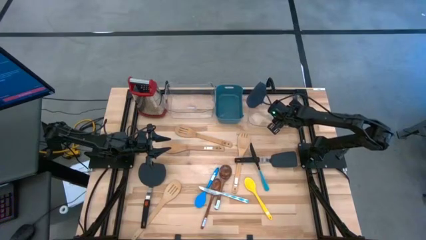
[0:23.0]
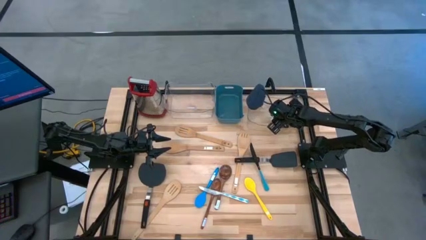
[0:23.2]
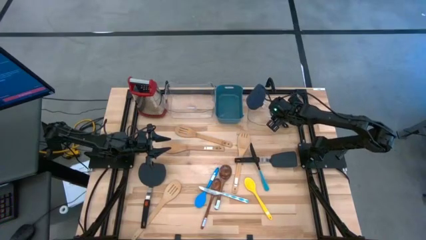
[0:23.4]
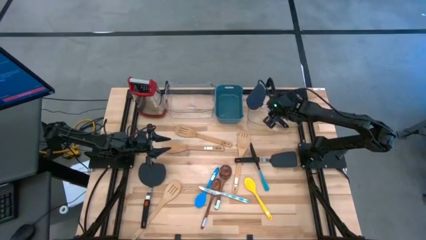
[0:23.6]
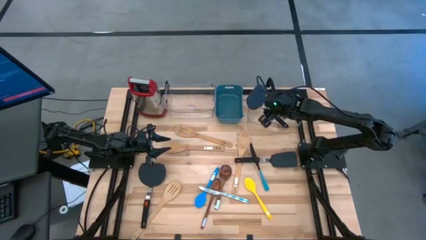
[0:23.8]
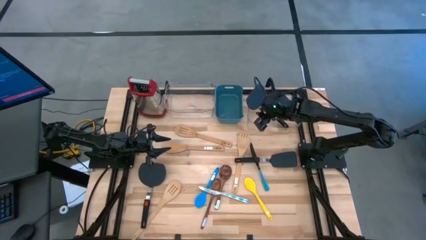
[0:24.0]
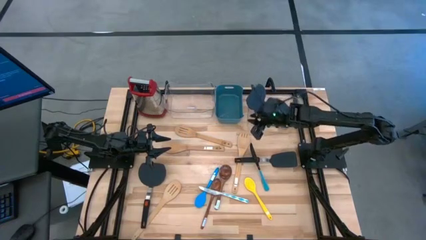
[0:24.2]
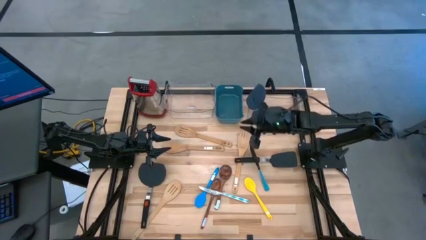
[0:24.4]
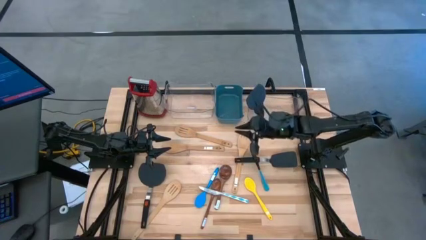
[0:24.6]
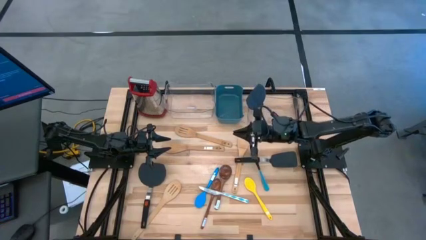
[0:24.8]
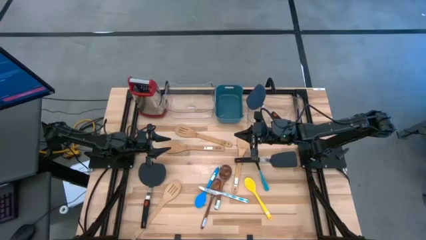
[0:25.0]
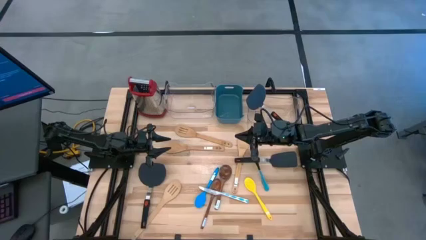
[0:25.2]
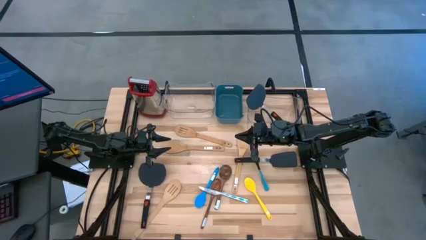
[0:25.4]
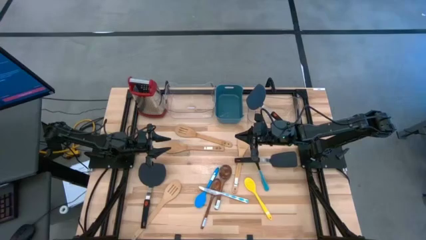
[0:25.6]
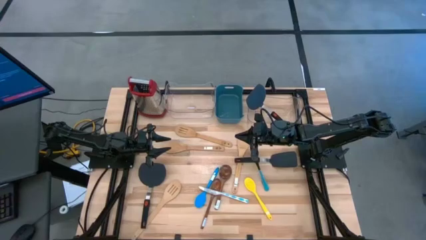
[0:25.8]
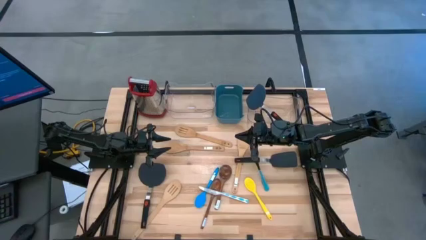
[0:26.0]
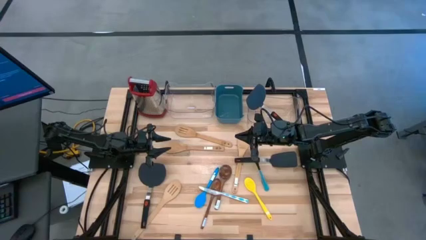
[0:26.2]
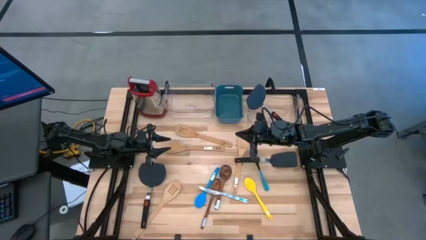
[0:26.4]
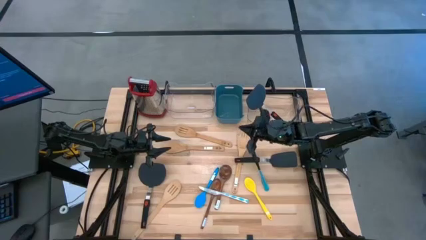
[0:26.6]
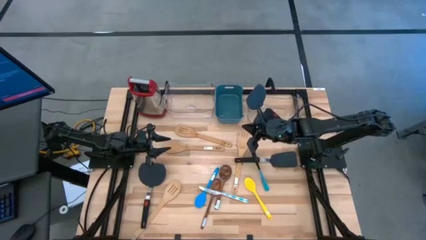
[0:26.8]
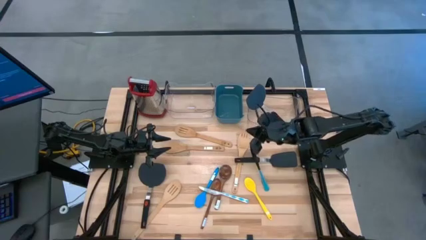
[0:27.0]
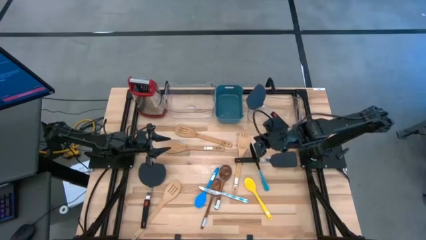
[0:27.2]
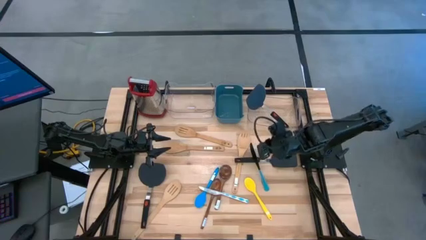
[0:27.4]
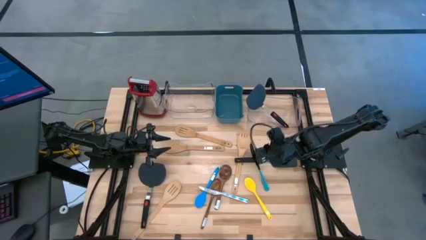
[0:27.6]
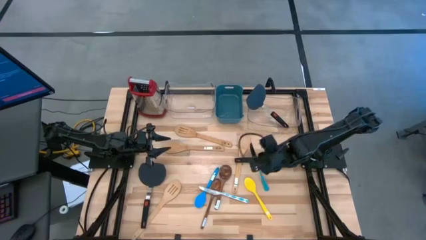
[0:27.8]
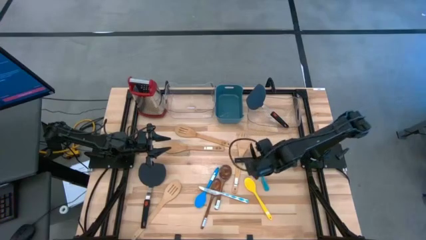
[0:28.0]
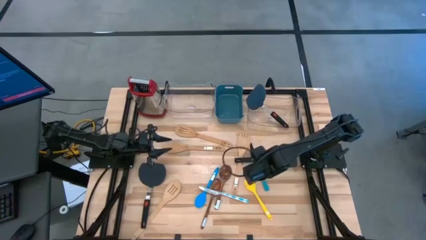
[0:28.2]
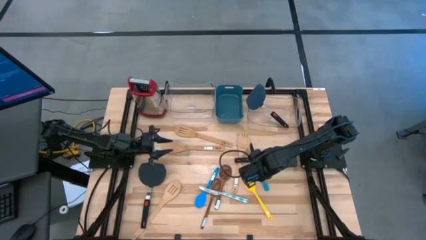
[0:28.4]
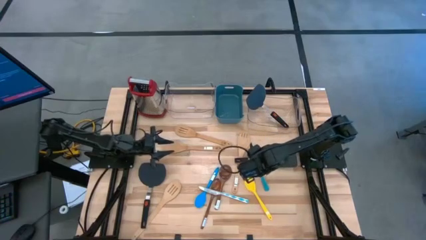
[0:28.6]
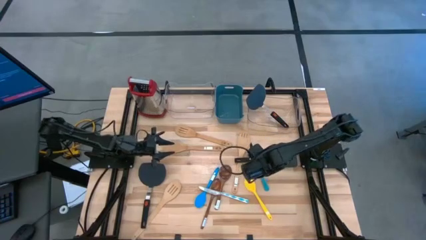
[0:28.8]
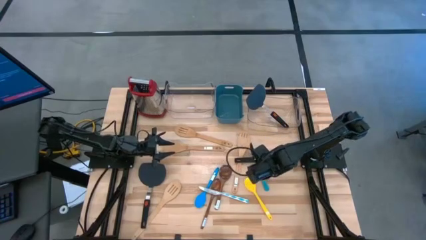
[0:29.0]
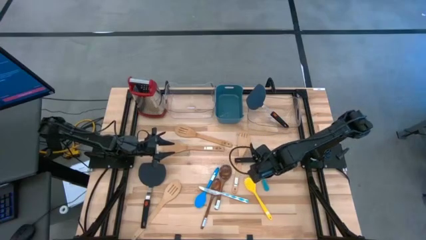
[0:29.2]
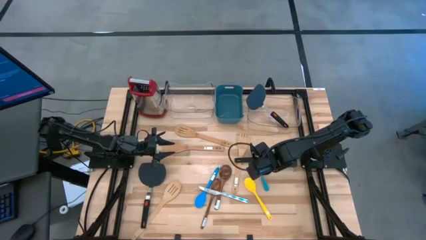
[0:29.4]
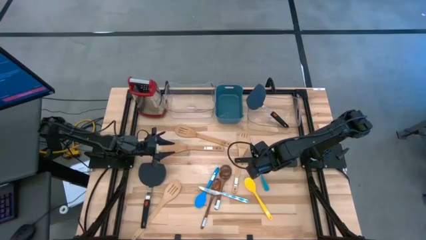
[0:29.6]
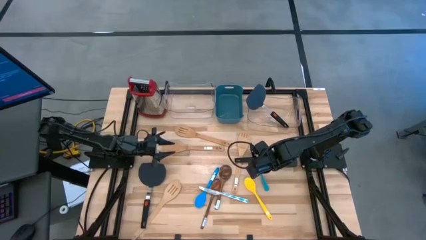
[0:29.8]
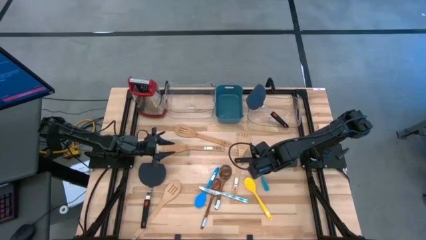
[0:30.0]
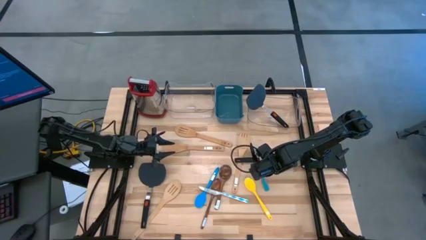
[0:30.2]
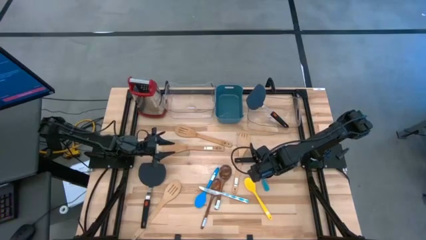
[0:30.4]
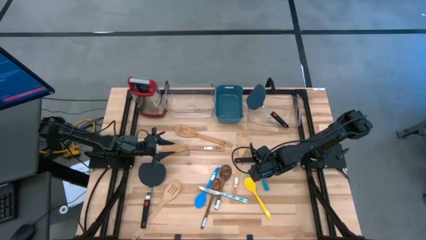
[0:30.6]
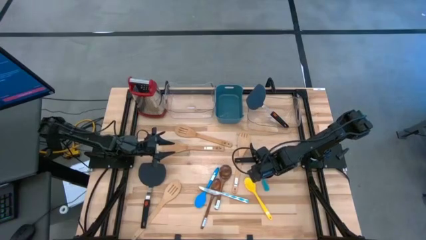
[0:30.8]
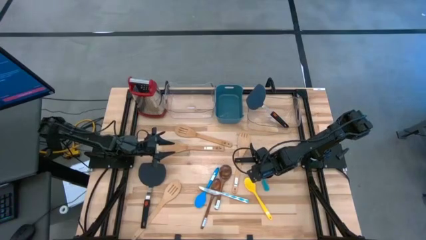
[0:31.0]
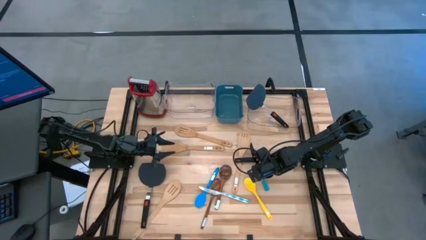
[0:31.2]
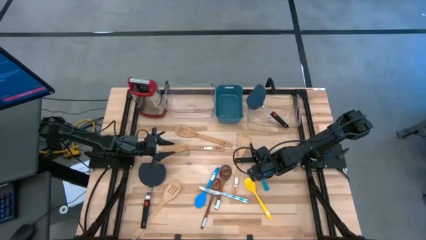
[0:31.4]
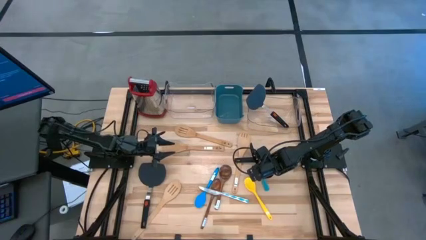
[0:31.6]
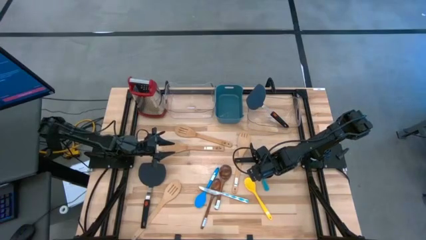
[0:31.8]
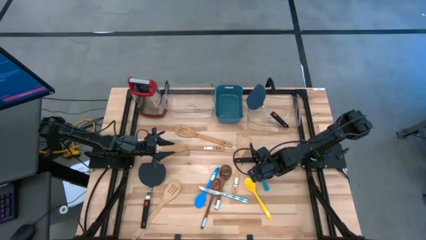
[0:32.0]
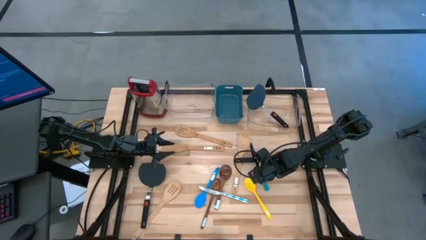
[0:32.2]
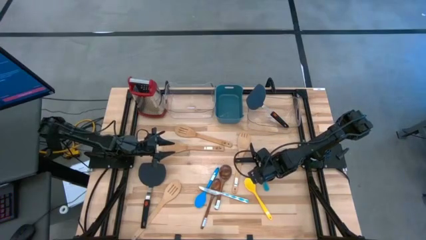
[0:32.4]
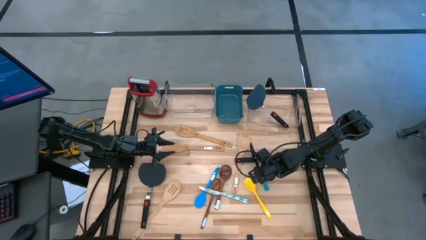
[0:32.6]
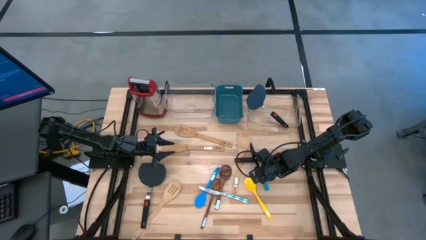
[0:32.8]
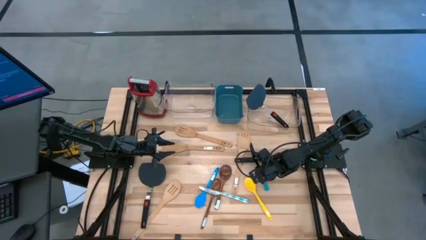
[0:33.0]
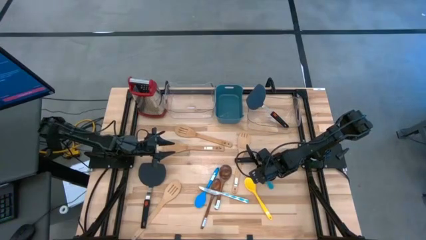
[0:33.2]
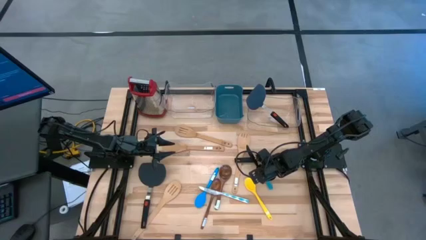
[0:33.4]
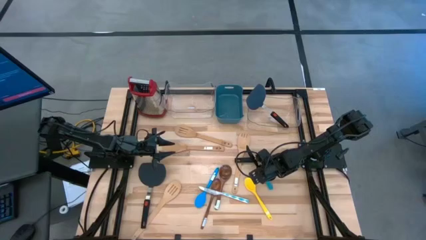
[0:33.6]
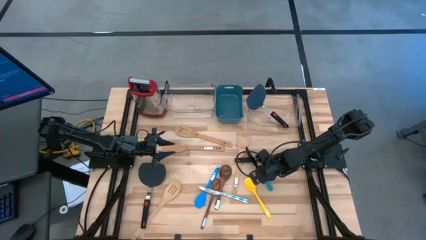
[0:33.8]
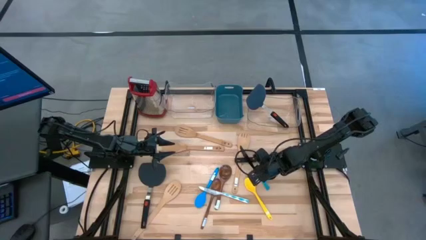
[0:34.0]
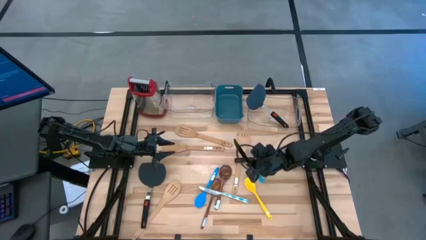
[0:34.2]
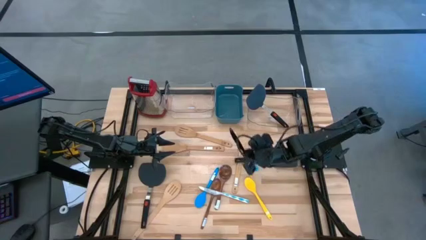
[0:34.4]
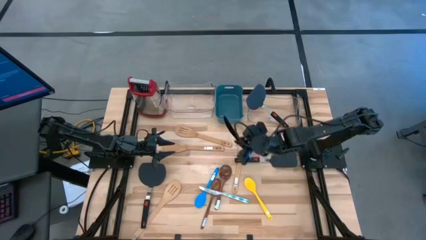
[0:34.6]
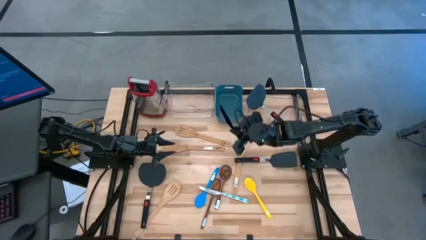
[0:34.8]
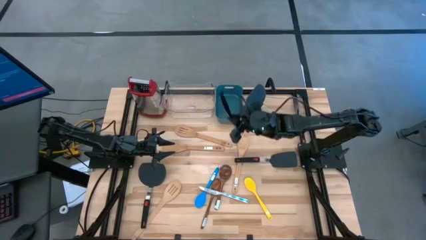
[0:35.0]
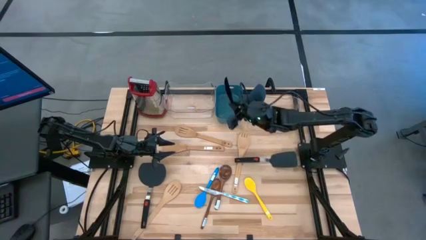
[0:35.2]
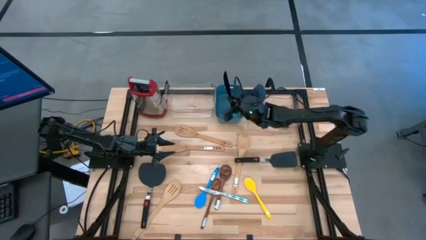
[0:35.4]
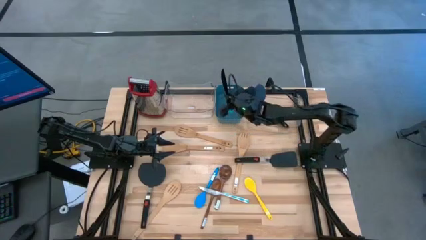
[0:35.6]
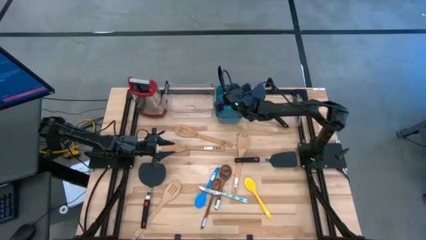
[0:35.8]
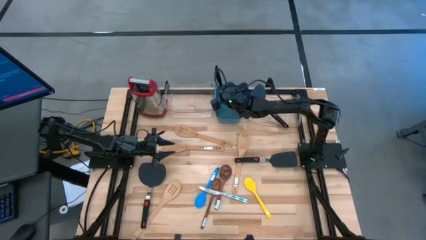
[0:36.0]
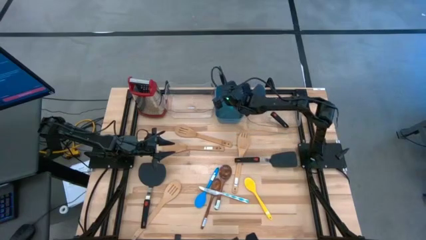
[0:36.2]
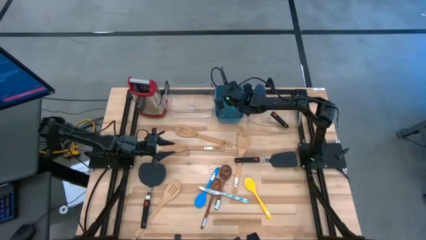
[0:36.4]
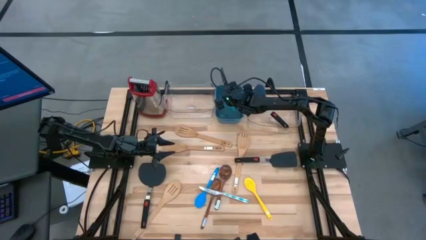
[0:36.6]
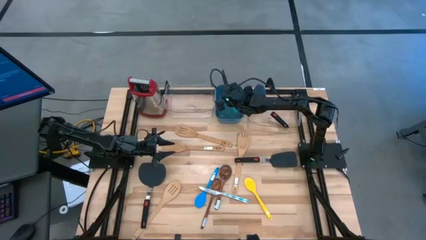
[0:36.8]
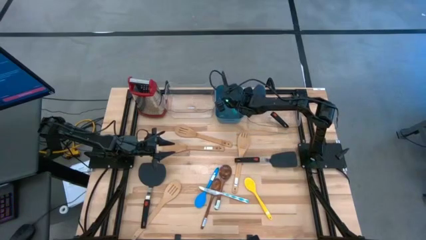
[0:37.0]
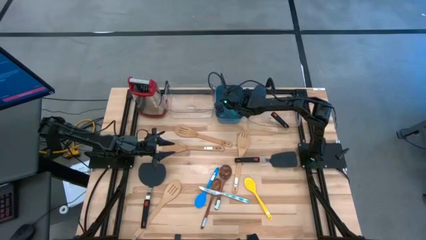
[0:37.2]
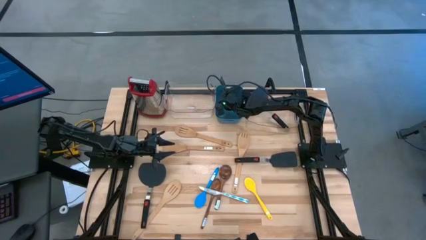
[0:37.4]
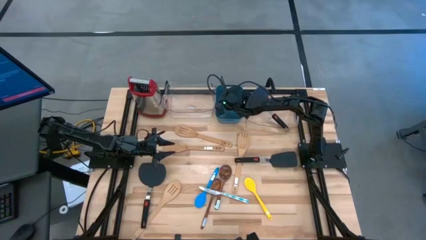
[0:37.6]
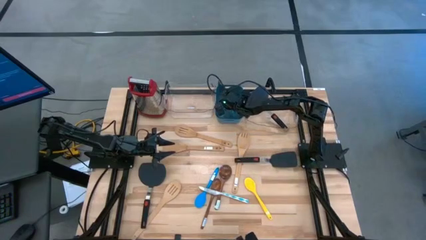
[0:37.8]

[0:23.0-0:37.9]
Task: Pick & Place Kitchen Items
Put the black table knife into the blue bin

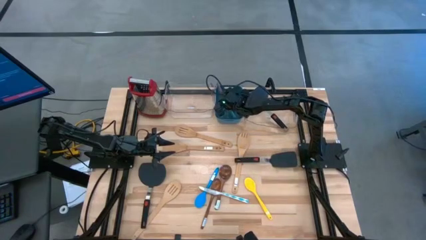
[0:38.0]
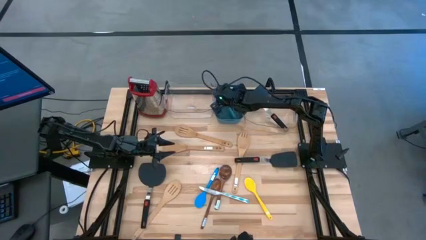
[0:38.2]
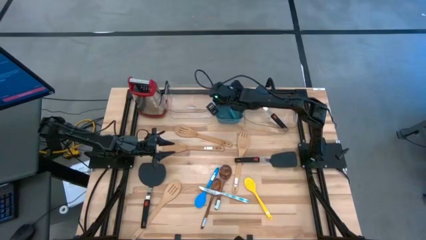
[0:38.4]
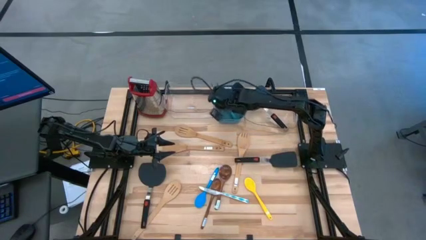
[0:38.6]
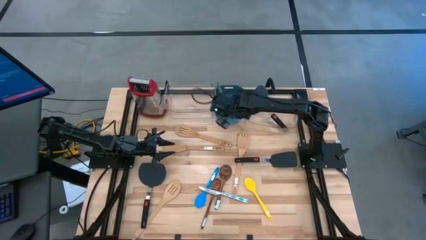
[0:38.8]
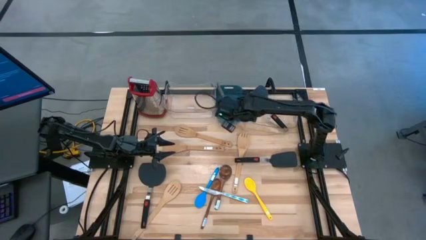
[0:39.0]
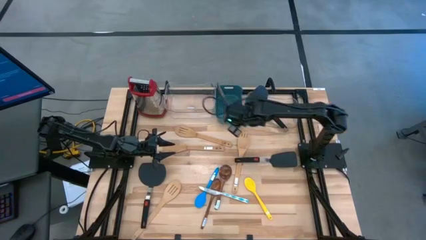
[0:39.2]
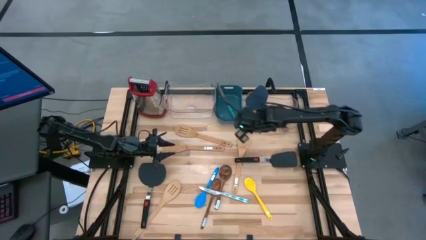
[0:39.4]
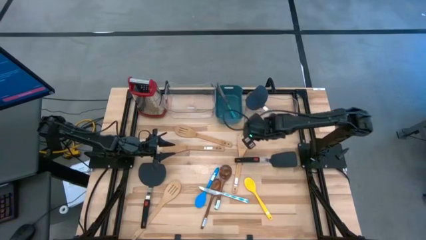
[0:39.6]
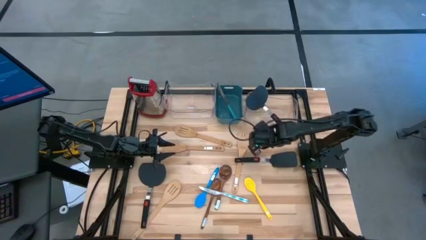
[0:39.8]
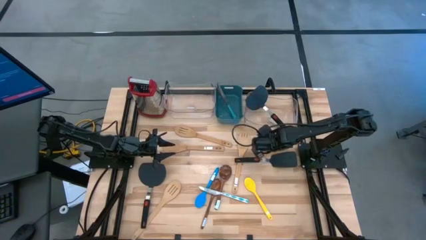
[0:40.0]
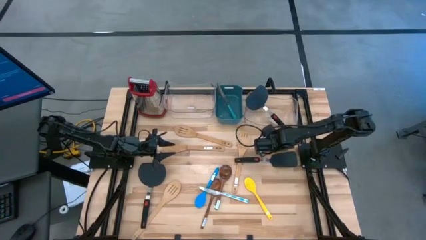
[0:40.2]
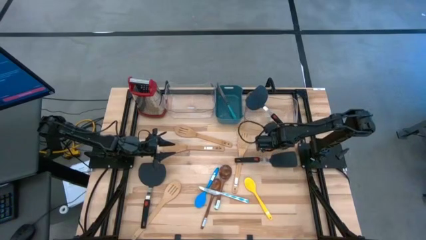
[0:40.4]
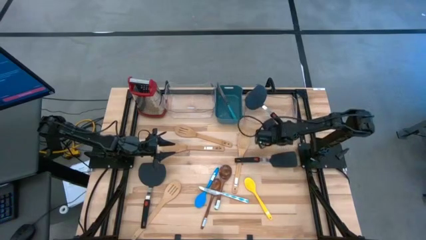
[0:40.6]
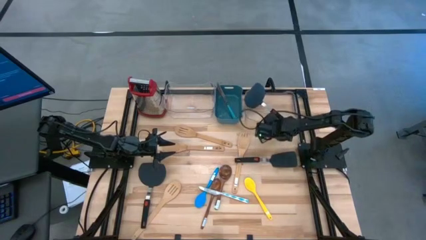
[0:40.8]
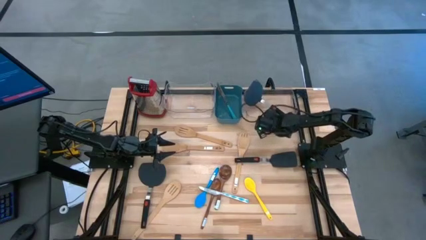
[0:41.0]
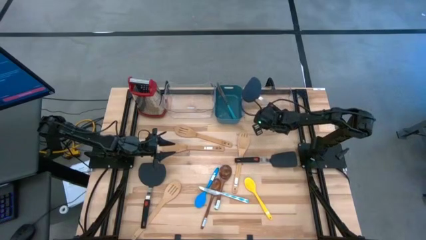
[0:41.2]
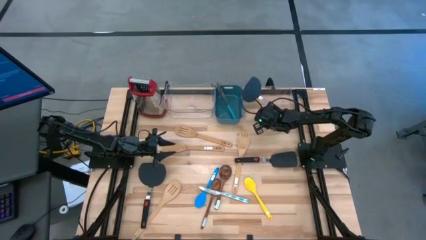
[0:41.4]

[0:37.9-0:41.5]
Adjust the right transparent bin
